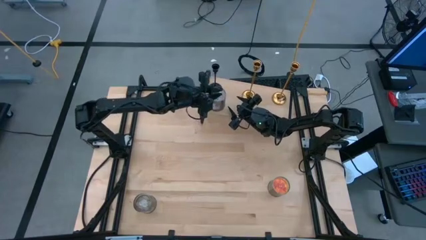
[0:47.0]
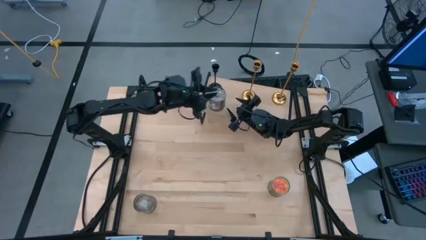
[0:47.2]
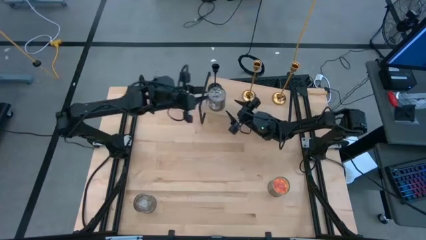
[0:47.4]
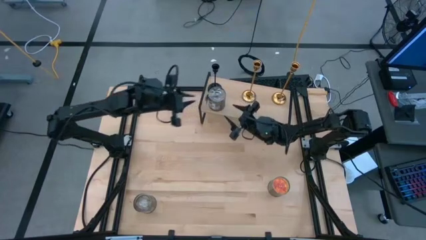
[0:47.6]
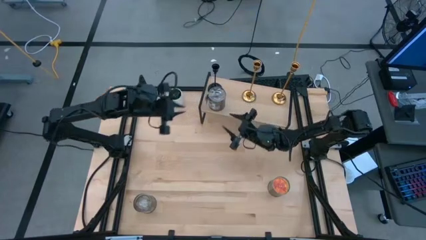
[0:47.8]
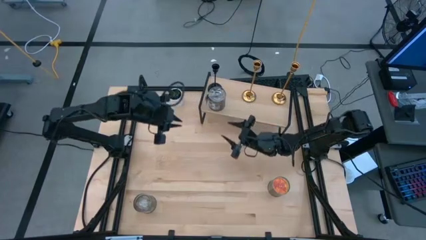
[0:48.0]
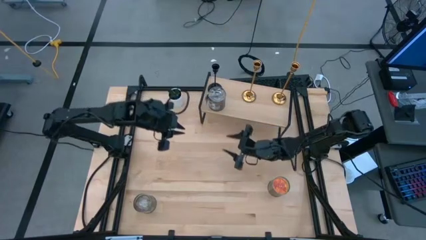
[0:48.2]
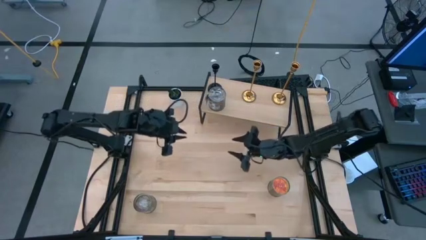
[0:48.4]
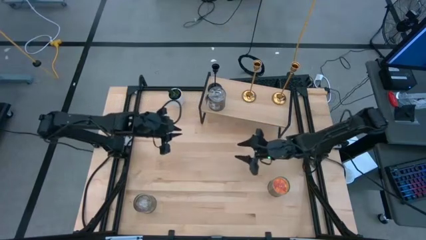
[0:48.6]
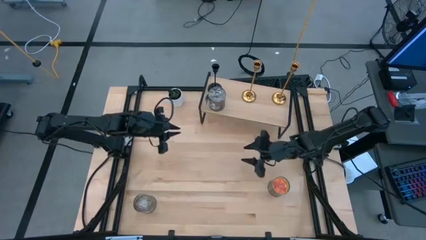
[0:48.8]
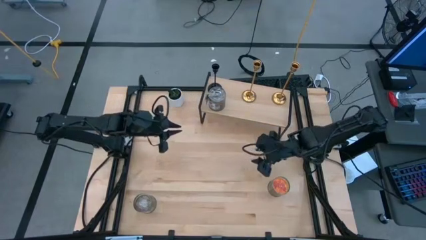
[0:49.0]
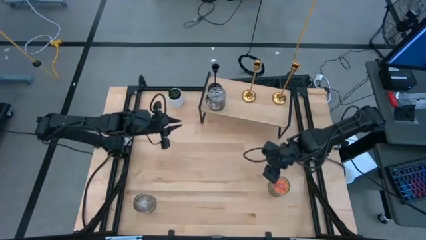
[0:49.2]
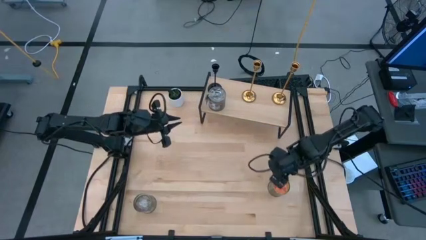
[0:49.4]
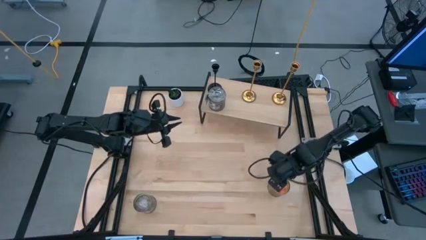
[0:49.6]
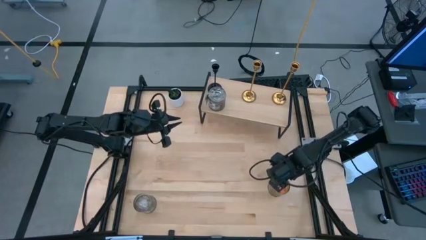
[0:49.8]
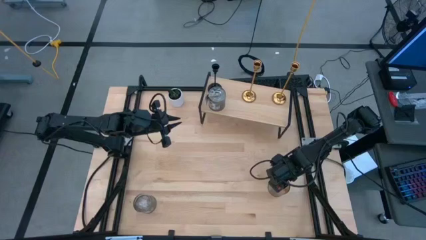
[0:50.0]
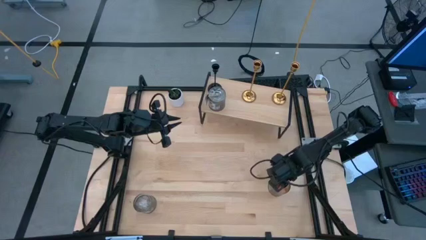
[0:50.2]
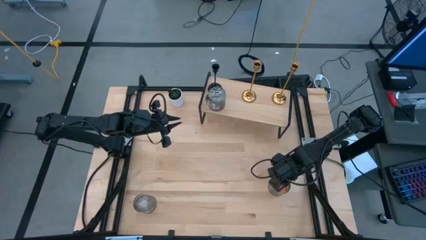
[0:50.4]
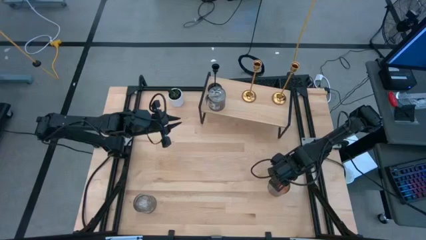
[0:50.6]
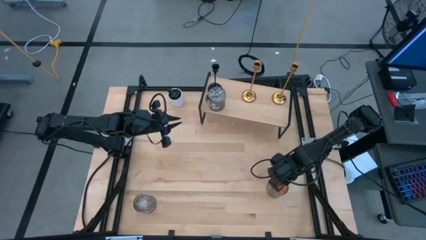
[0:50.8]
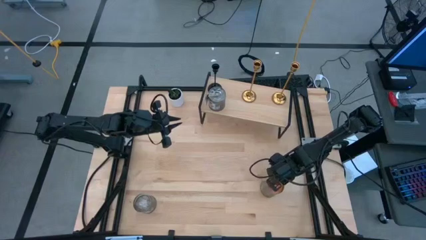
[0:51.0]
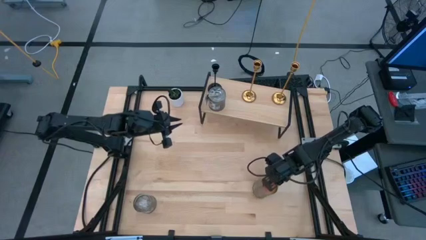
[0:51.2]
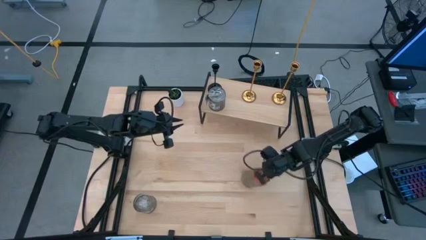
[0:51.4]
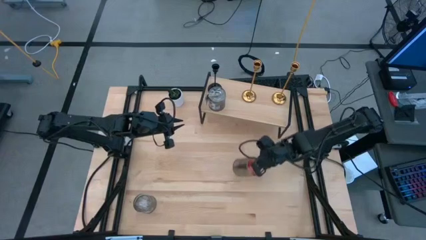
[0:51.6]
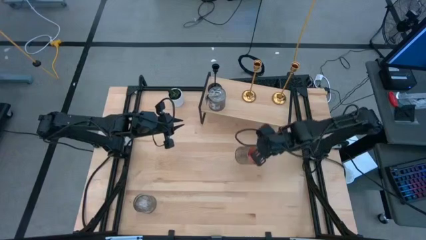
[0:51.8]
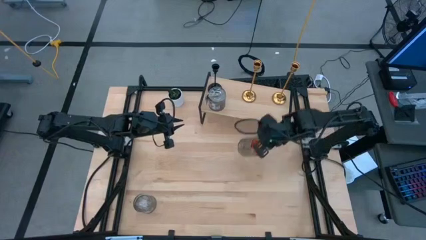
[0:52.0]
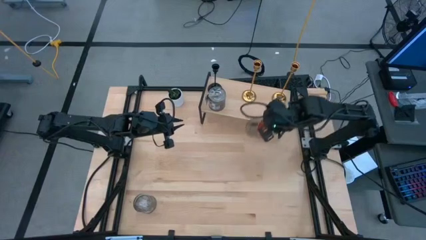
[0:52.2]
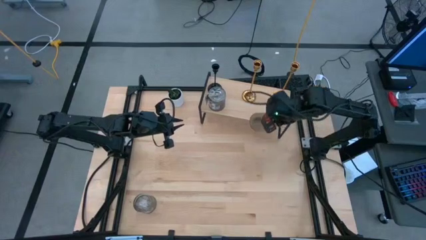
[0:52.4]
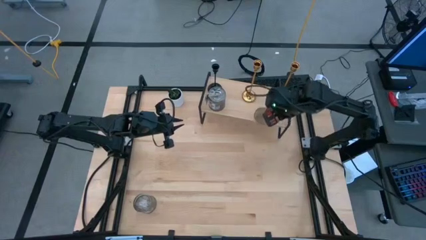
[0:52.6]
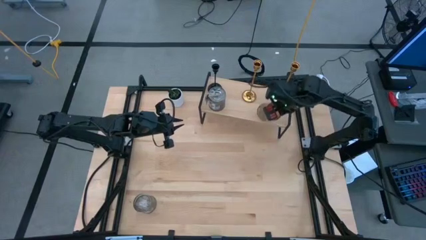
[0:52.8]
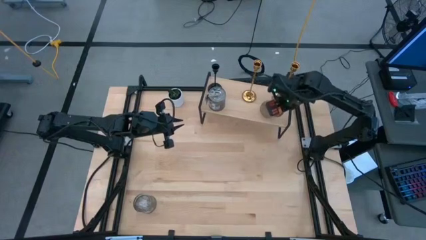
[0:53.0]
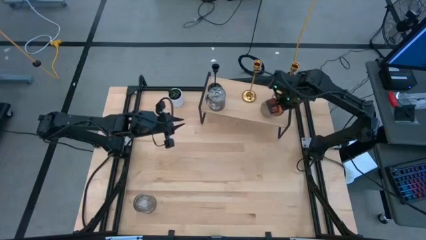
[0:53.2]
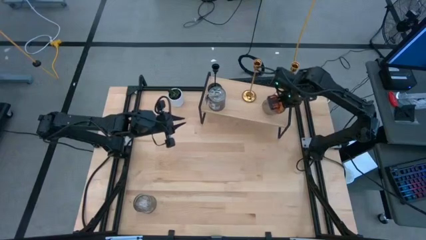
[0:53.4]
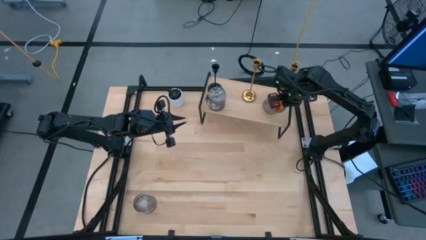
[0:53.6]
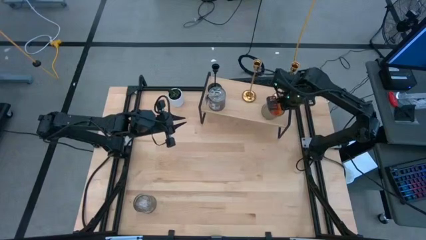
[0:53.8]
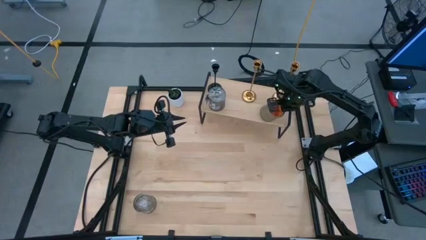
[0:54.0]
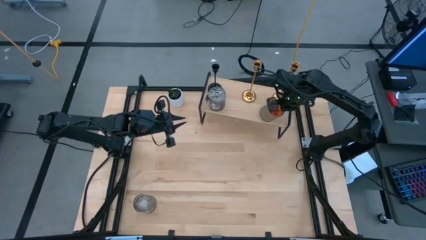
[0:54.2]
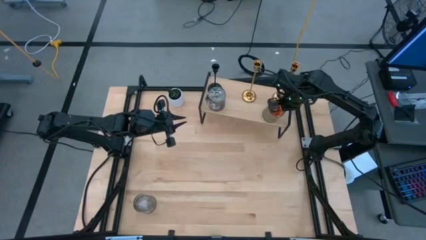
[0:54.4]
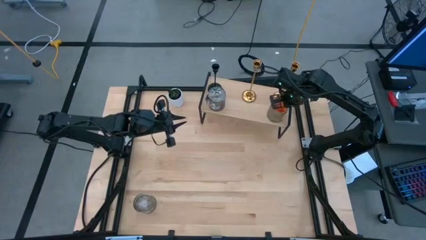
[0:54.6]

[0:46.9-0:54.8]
Task: Pick & Place candle stick holders
Put the orange scented candle on the shelf

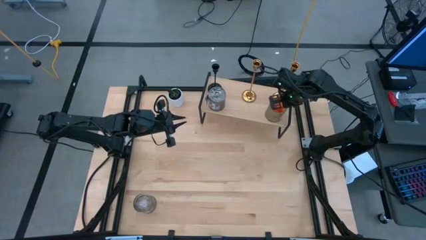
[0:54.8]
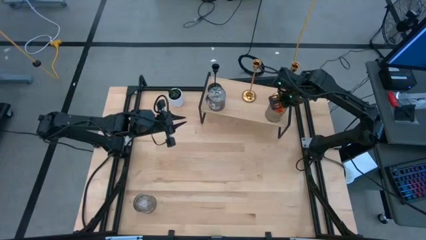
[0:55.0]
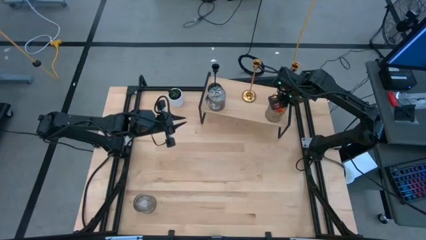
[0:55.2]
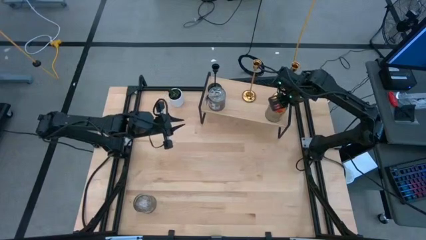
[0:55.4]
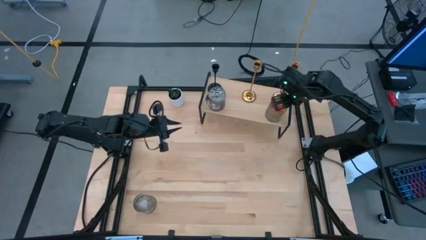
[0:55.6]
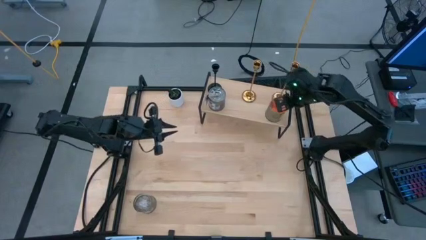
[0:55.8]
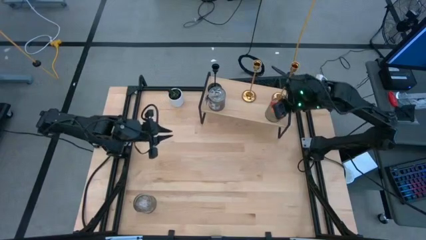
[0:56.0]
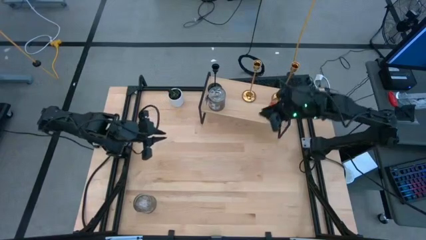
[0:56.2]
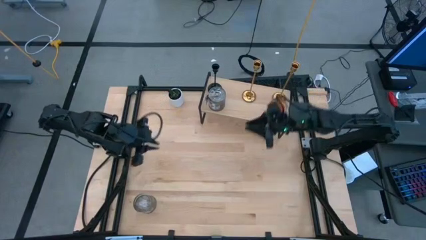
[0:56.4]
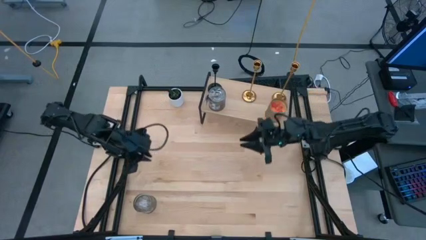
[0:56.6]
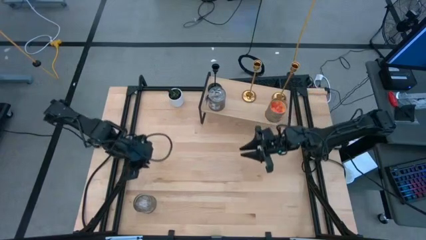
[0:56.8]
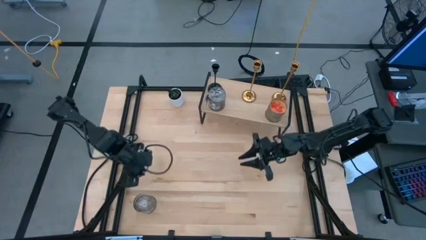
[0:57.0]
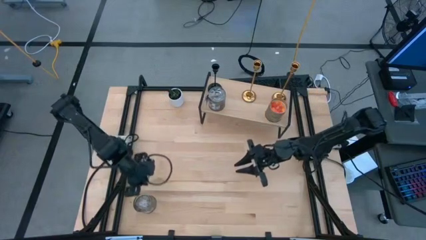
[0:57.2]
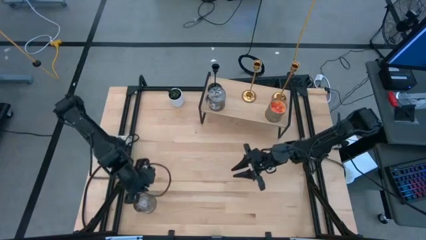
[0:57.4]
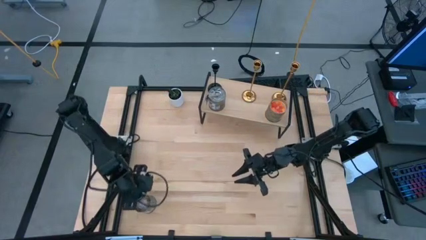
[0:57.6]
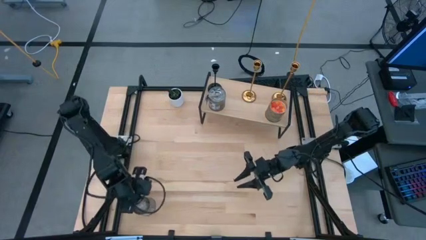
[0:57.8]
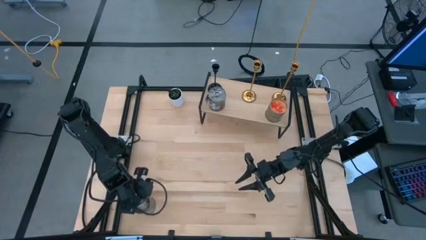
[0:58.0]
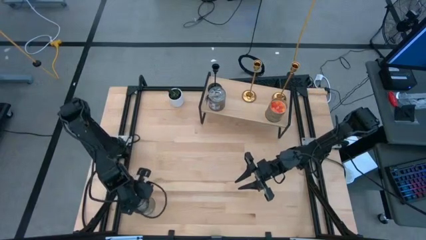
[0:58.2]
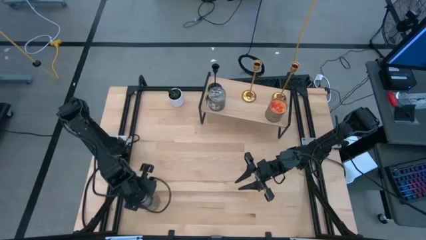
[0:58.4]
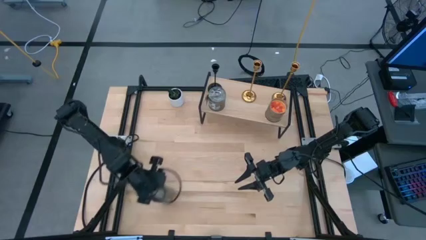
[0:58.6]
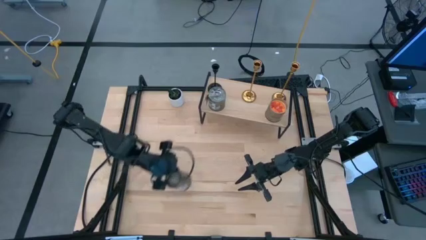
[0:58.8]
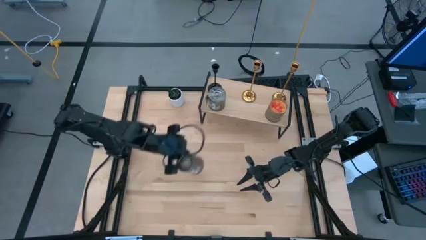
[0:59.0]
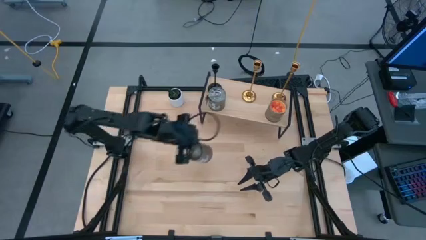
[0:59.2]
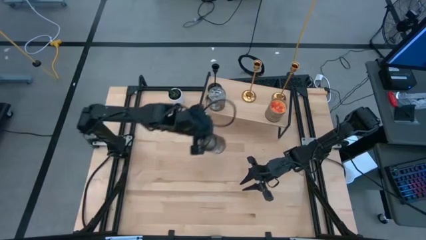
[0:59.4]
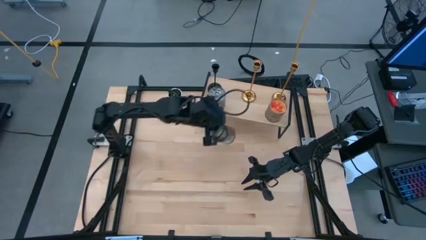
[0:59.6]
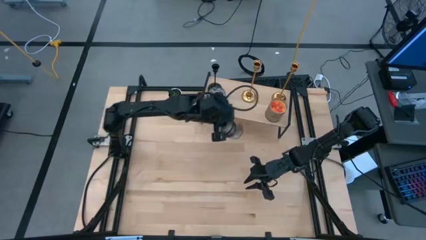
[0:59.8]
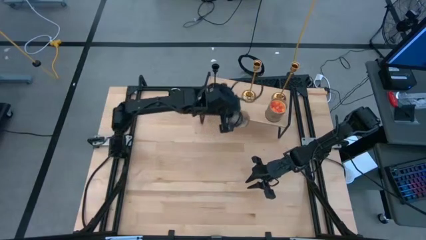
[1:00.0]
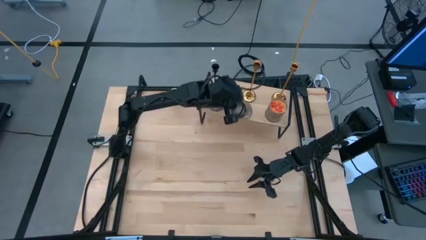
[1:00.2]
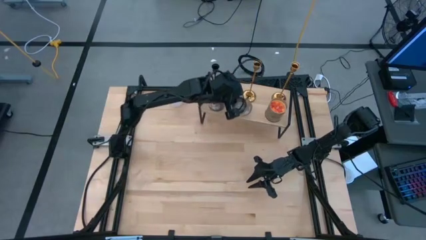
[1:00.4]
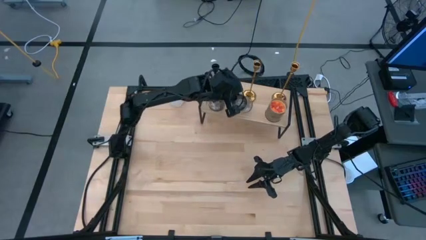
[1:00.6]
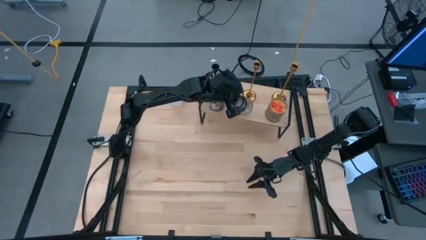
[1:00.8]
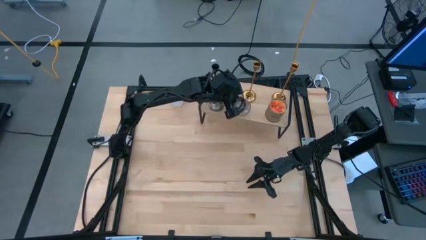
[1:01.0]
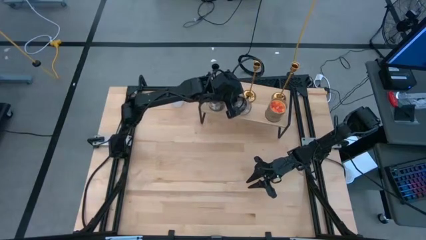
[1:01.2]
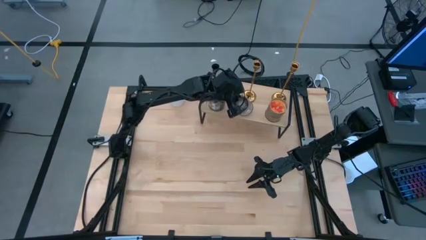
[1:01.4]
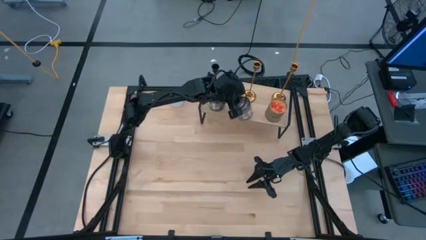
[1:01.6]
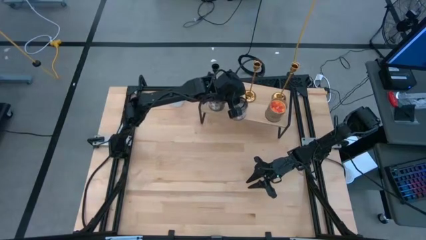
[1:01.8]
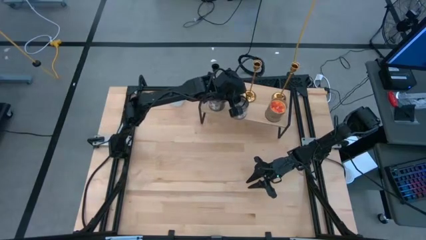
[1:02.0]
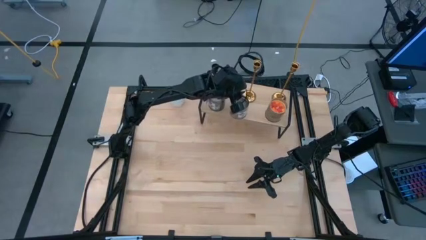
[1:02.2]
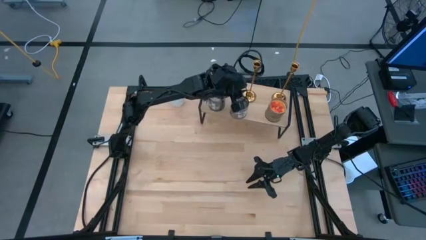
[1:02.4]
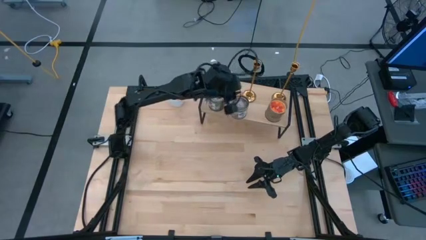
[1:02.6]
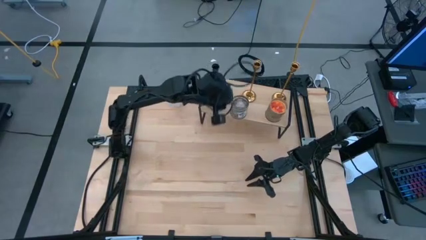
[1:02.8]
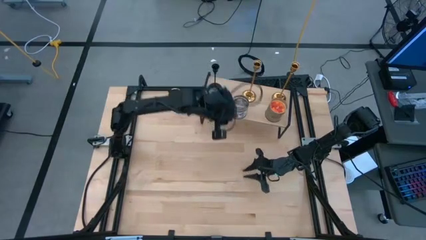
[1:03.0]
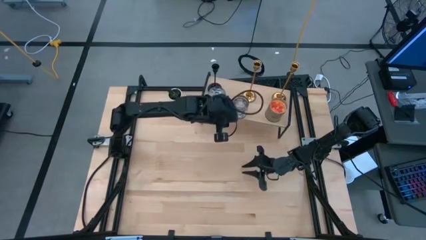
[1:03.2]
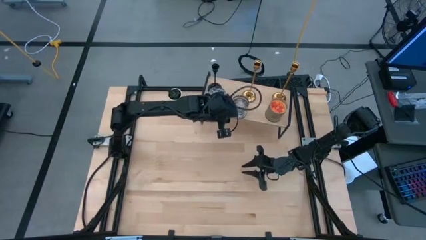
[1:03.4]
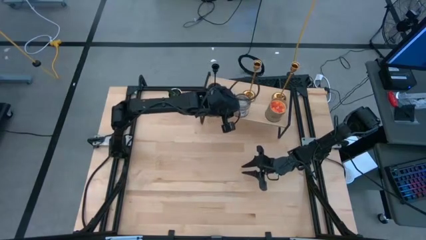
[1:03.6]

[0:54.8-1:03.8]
Put the brown scented candle on the shelf

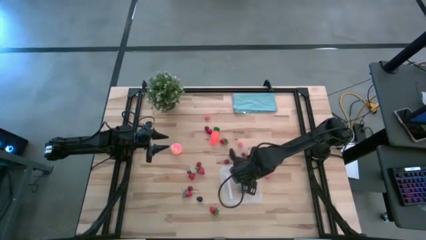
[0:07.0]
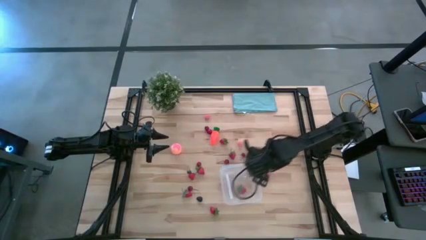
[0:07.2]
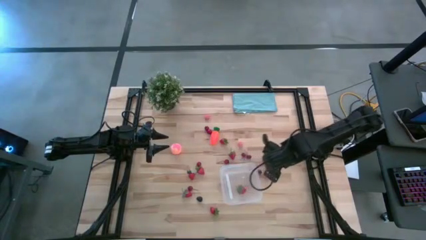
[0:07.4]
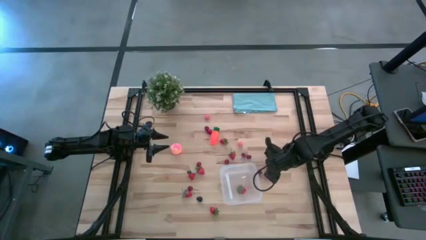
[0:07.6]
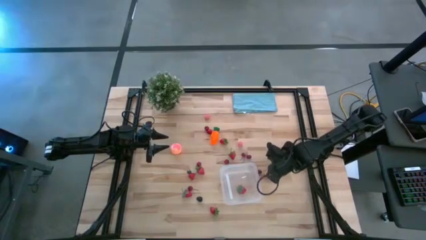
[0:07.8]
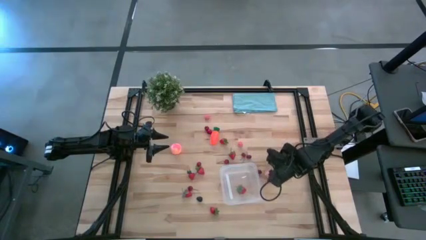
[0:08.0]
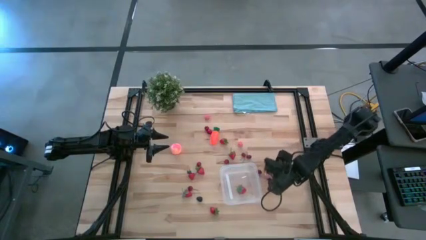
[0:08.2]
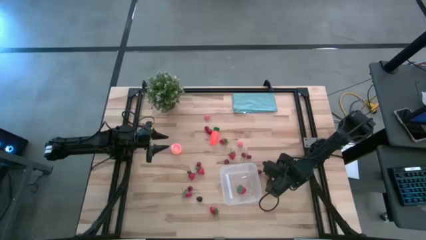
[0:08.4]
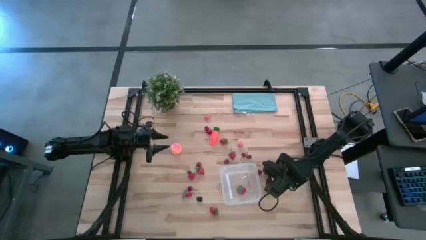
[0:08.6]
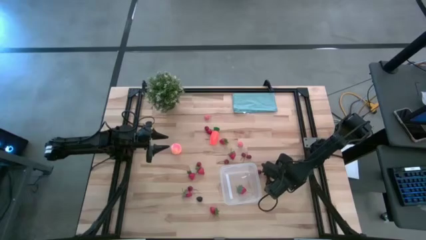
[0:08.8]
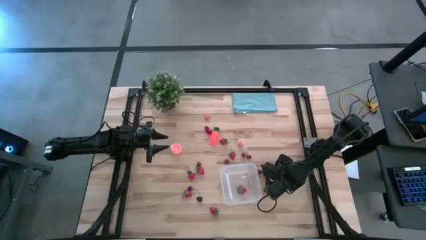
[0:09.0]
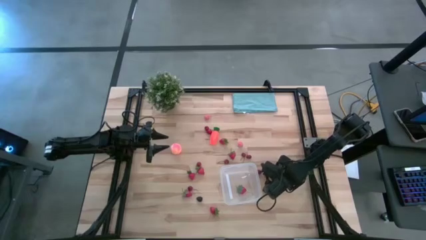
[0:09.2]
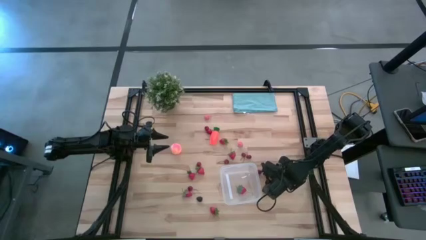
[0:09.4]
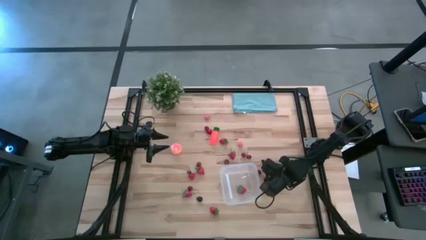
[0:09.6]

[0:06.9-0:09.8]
Task: Pick and placing Produce into tupperware
Put the pink peach into the transparent container
